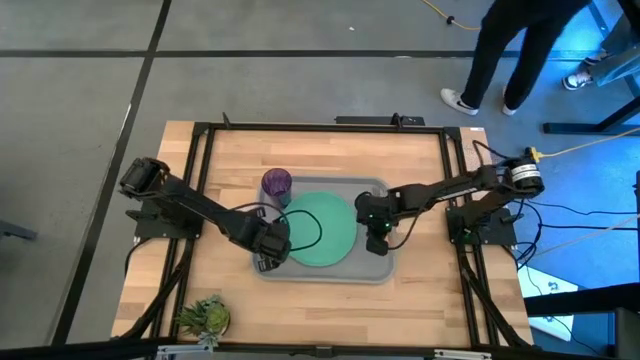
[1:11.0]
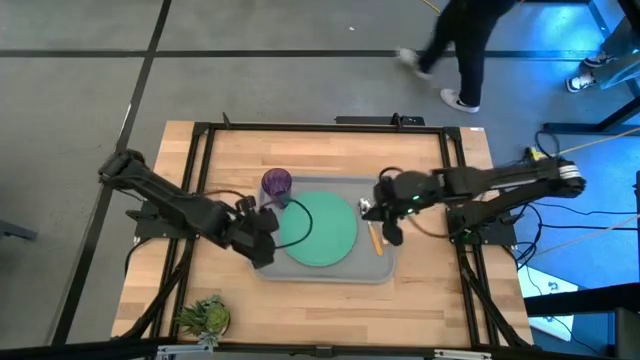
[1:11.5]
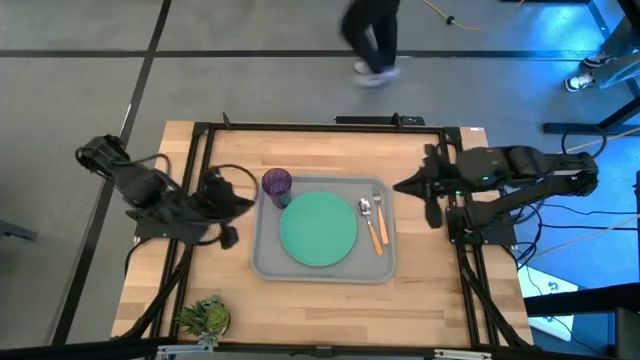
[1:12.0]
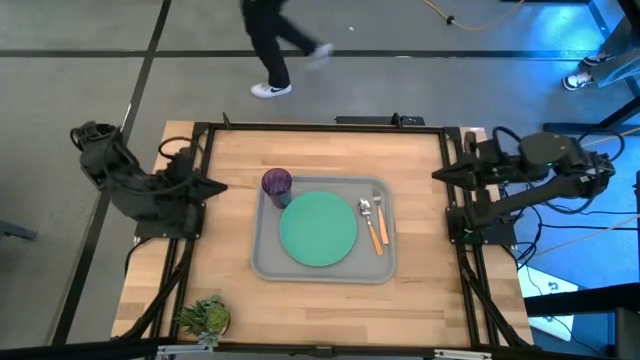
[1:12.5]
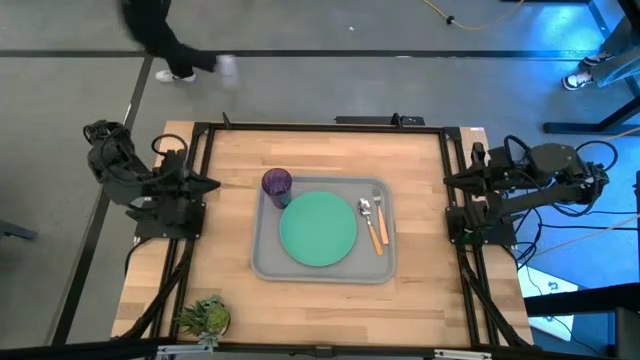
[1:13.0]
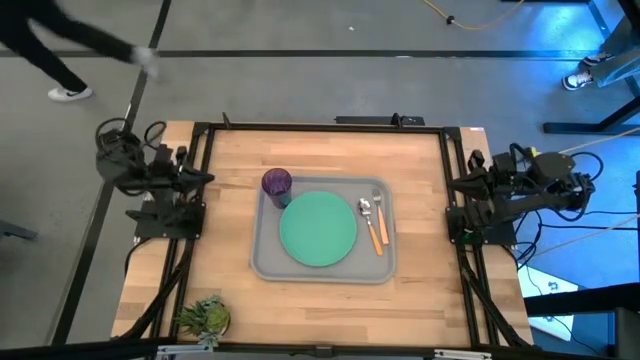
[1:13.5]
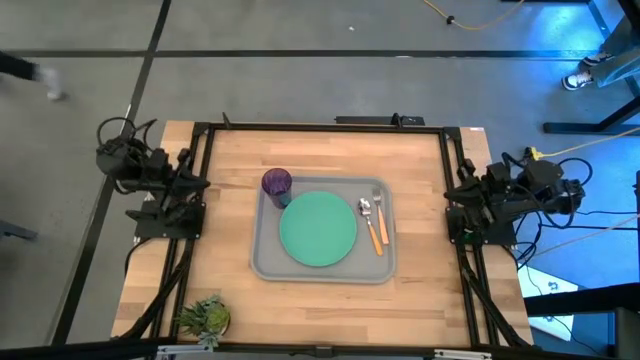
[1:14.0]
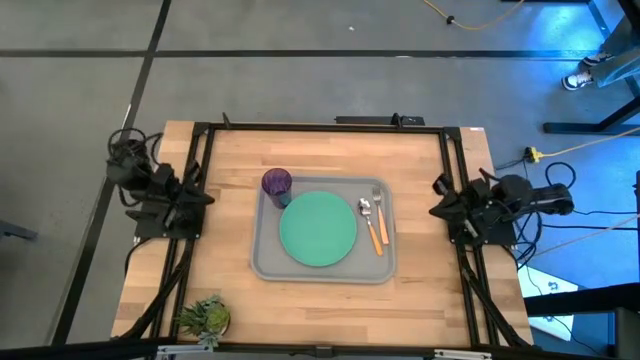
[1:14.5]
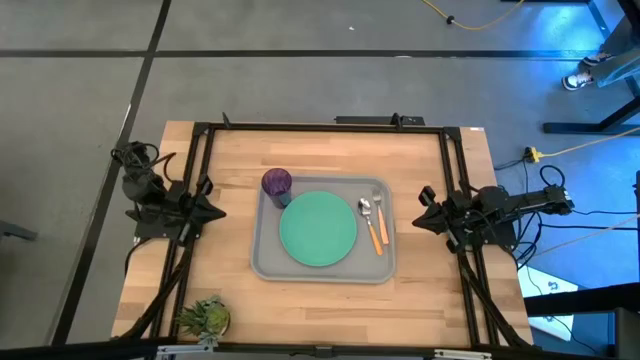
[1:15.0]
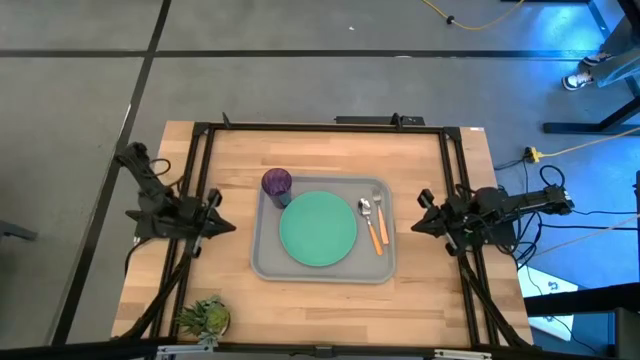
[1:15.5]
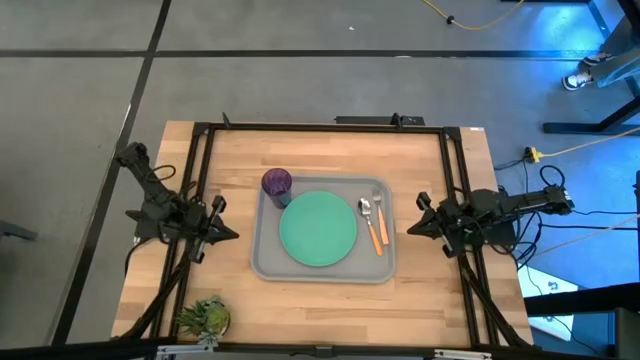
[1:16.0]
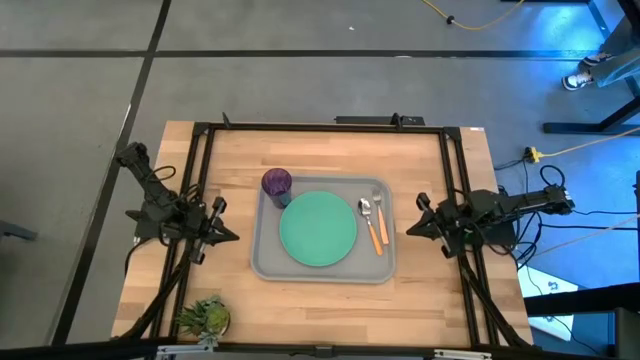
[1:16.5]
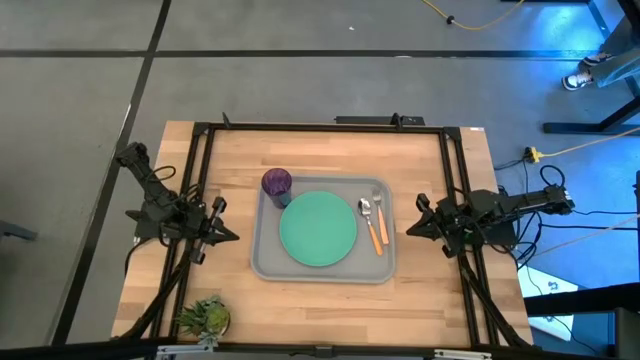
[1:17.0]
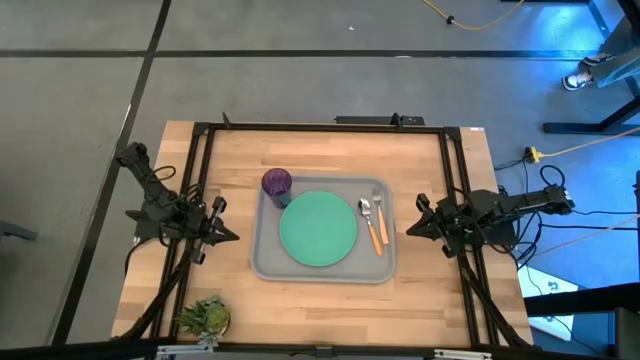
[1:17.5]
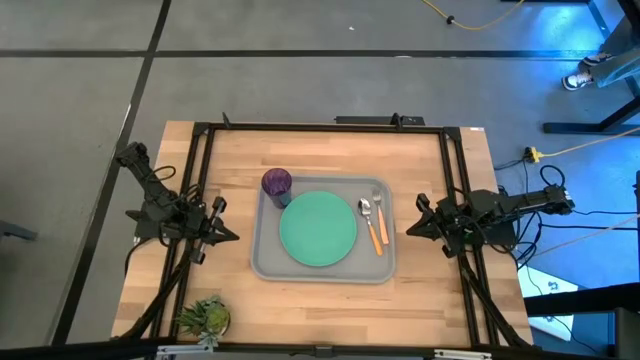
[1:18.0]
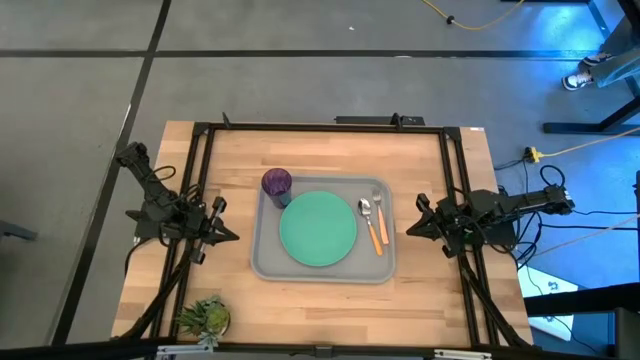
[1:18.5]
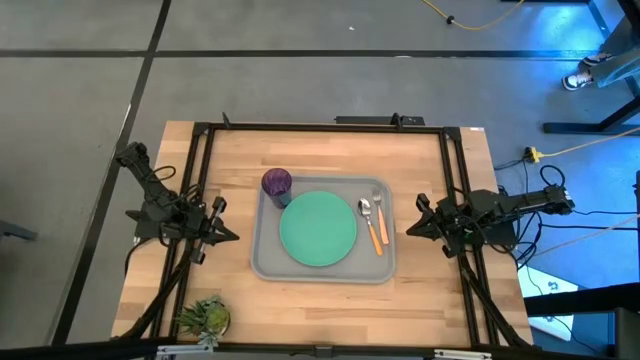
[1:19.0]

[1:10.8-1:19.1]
Task: Pick and place plate/cup/fork/spoon on tray
Return to Home Position

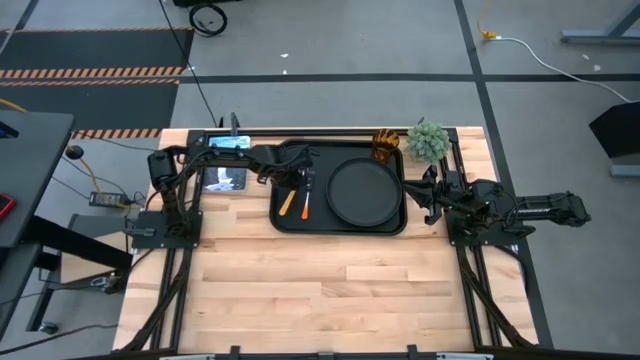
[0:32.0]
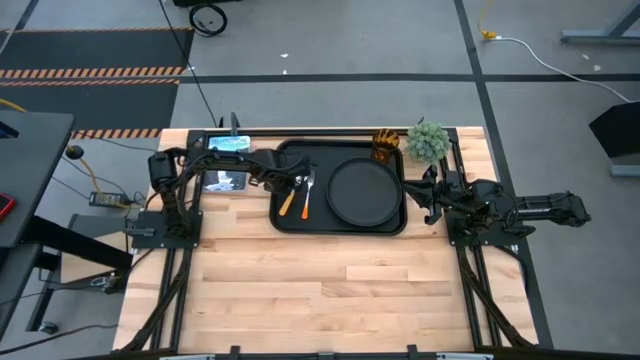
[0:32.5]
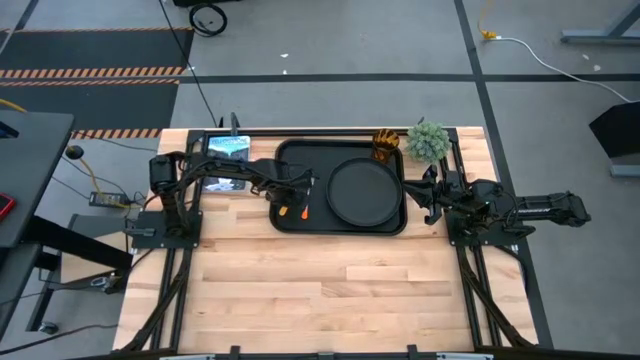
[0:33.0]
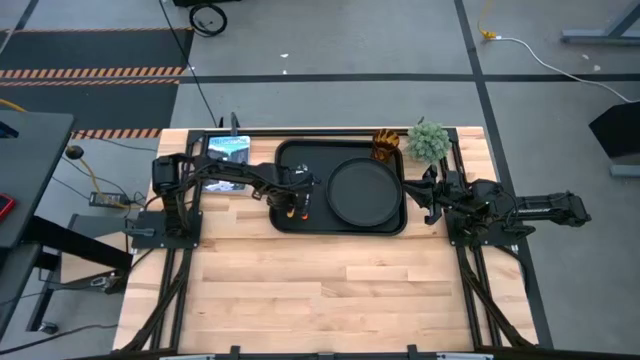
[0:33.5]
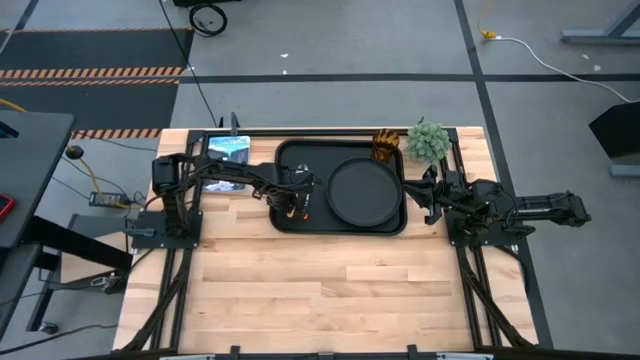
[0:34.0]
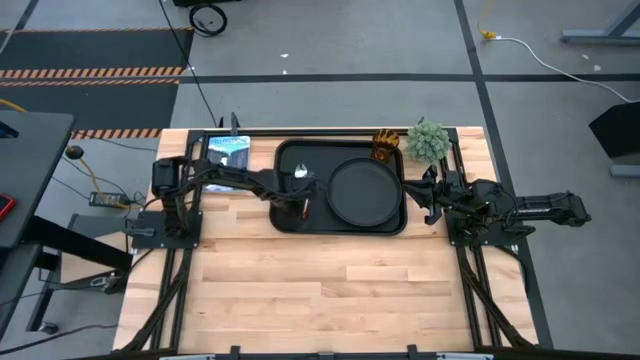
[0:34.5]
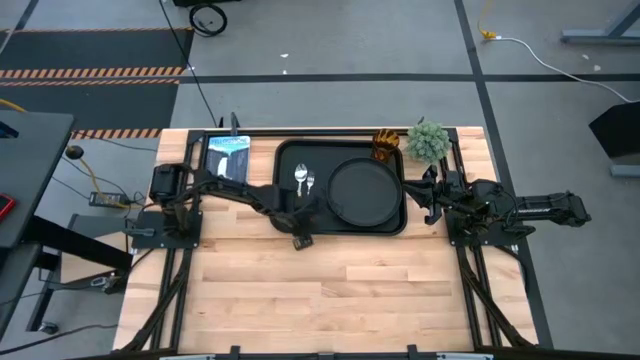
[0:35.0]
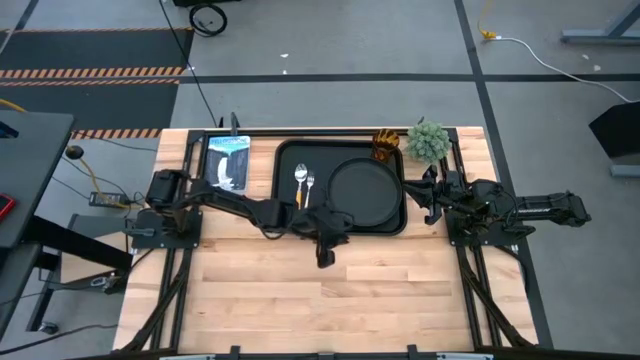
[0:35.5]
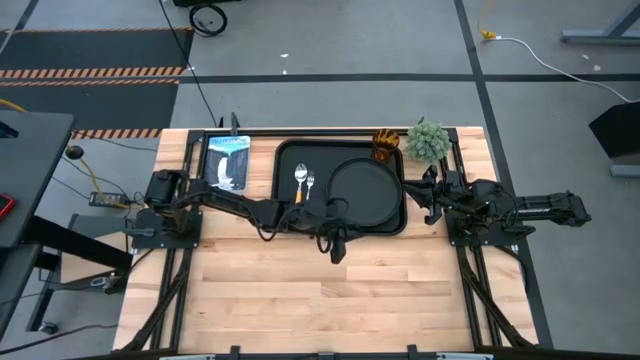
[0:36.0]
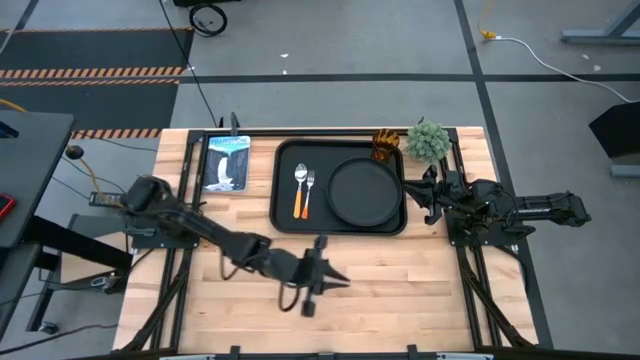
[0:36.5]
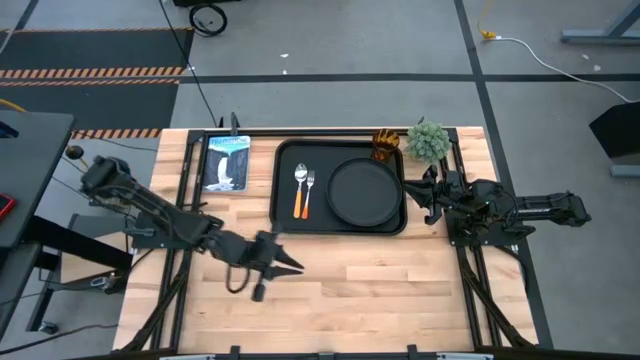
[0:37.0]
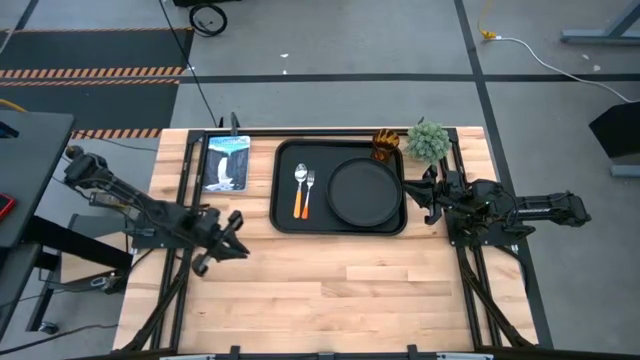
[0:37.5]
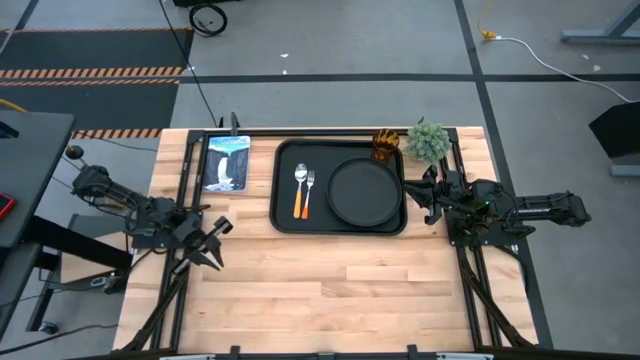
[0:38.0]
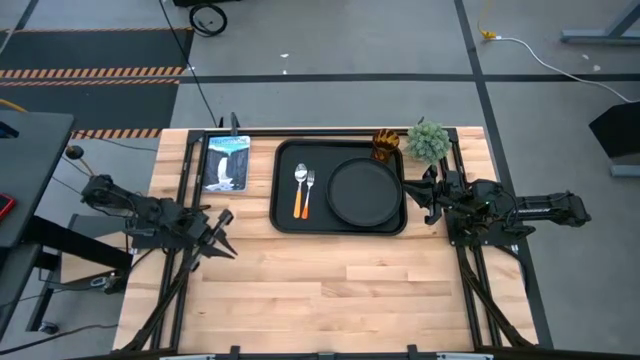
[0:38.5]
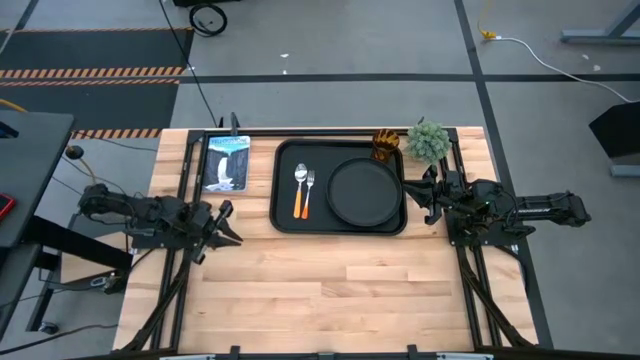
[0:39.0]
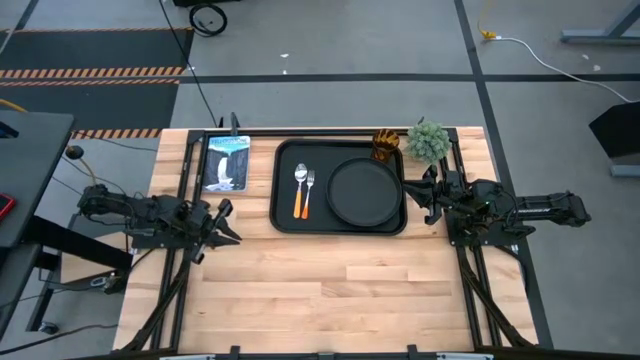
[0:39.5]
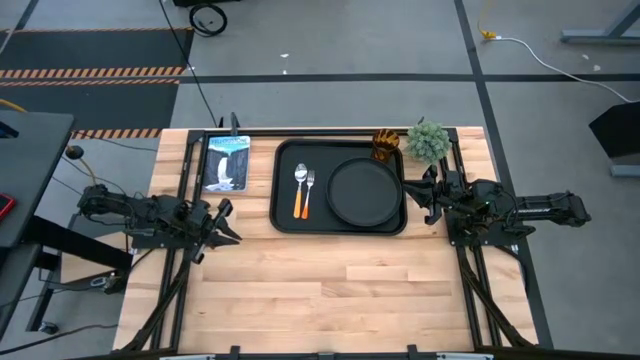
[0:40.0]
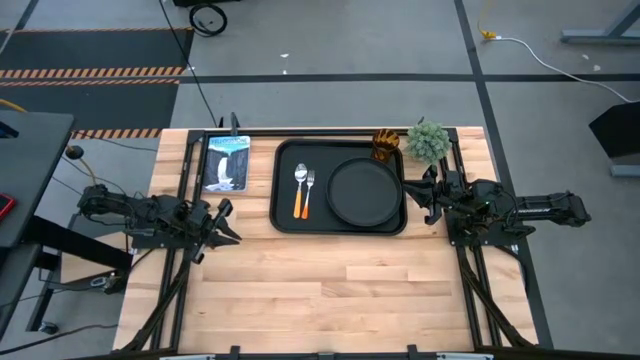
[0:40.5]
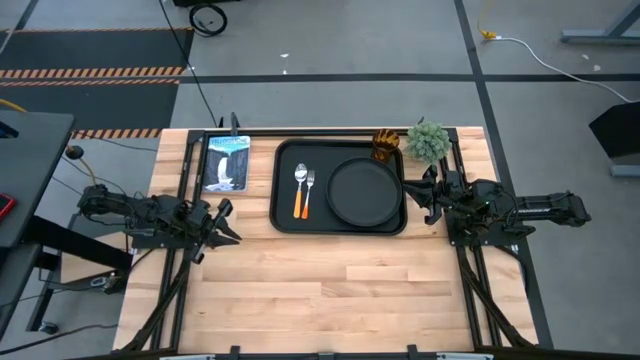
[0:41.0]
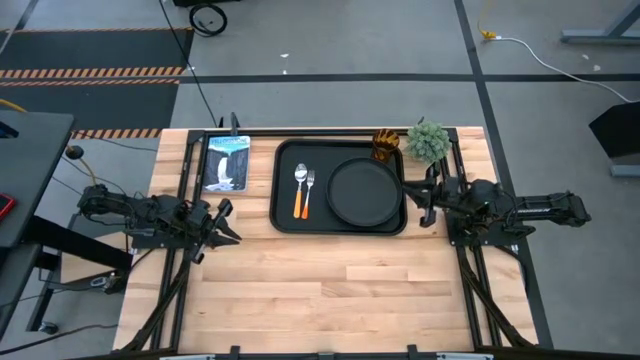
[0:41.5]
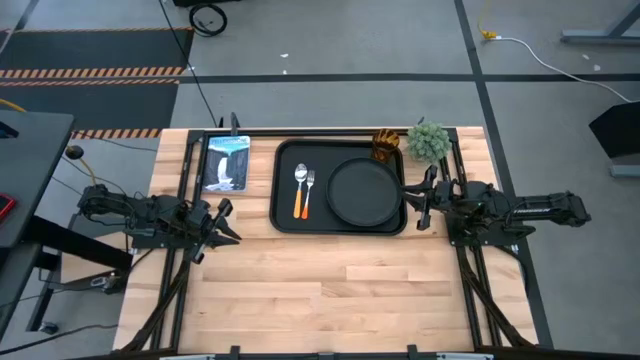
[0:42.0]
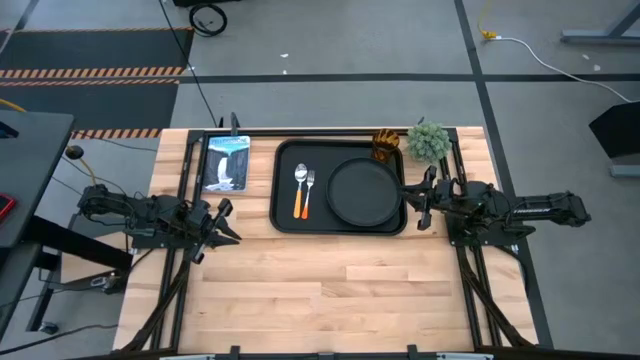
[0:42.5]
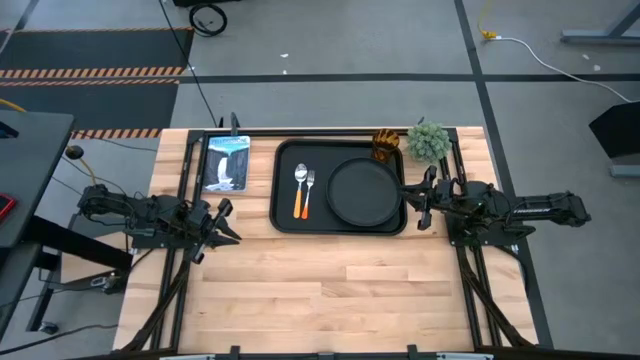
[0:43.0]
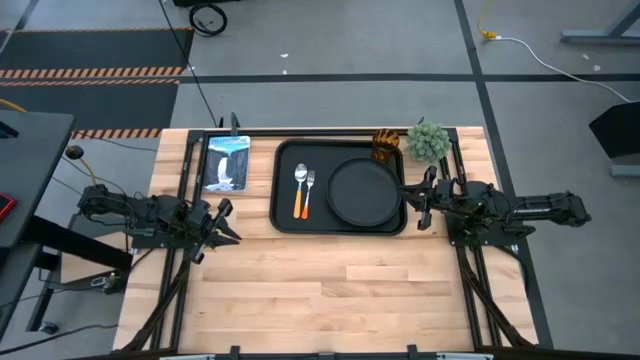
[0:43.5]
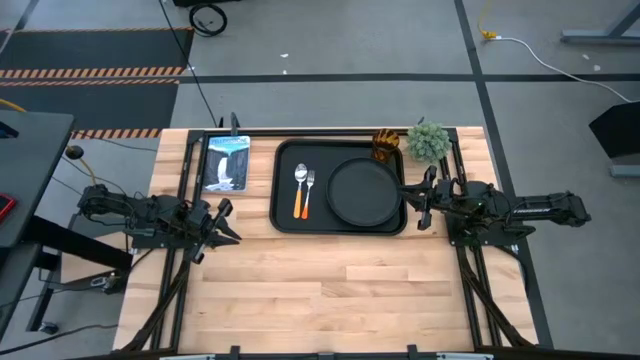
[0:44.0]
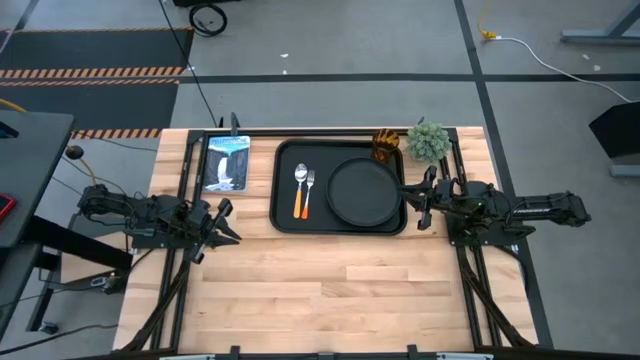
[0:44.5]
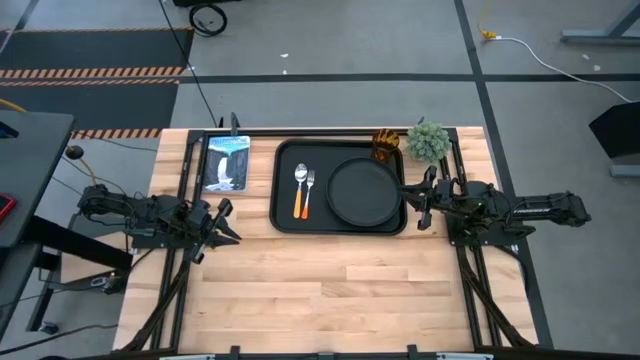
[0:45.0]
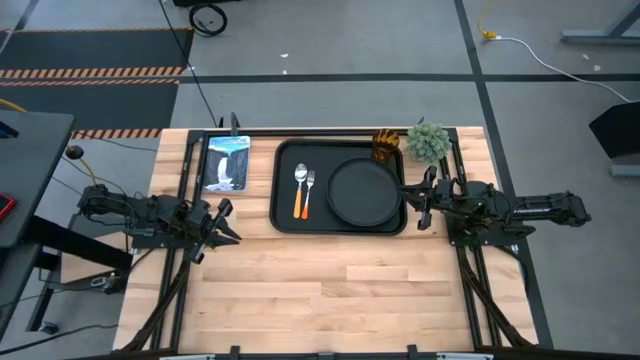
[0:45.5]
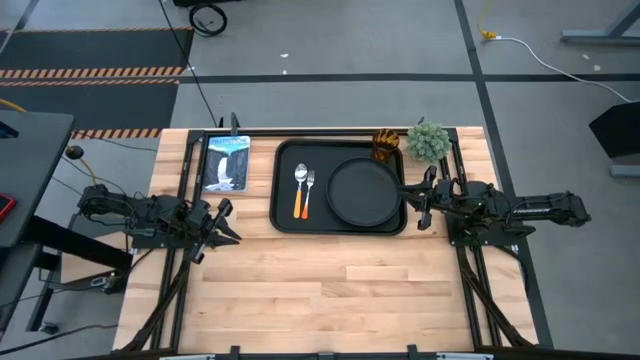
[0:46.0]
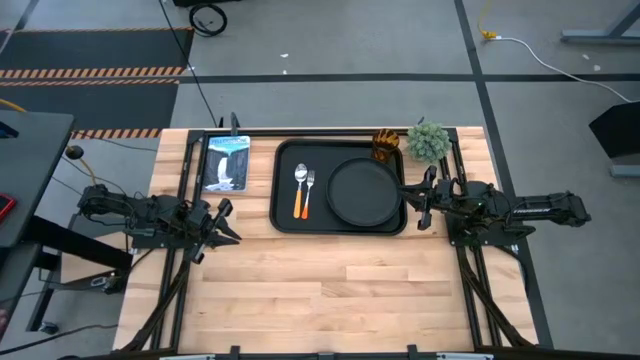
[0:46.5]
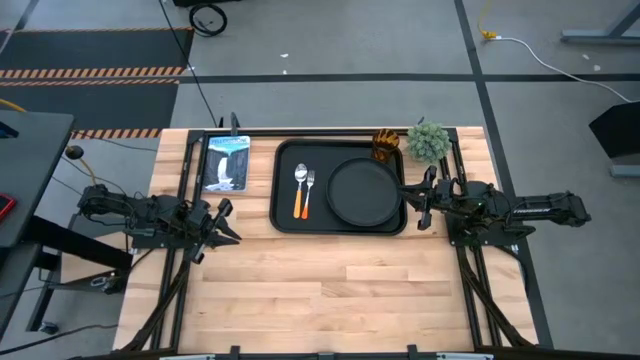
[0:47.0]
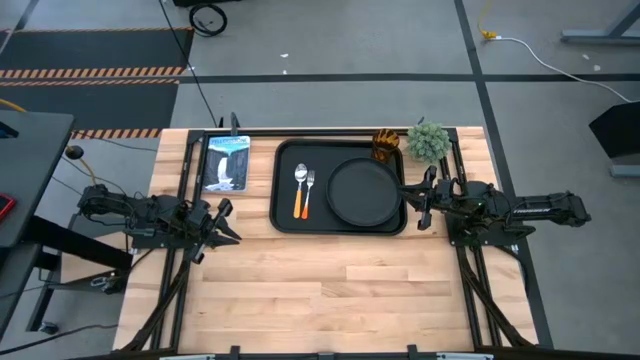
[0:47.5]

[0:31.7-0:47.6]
Task: Pick and place plate/cup/fork/spoon on tray
Return to Home Position
